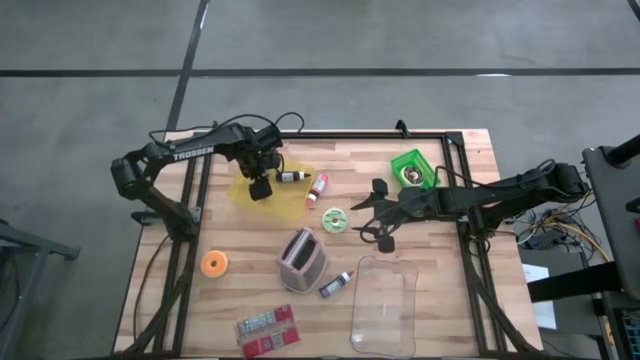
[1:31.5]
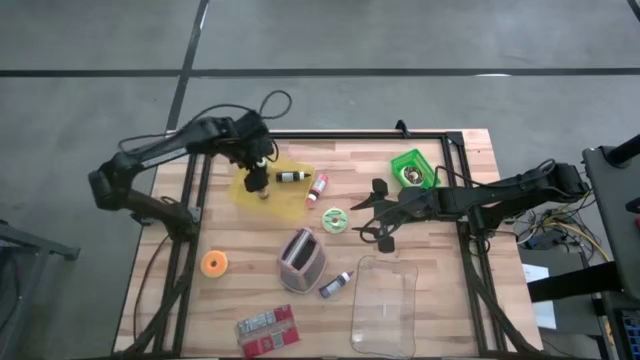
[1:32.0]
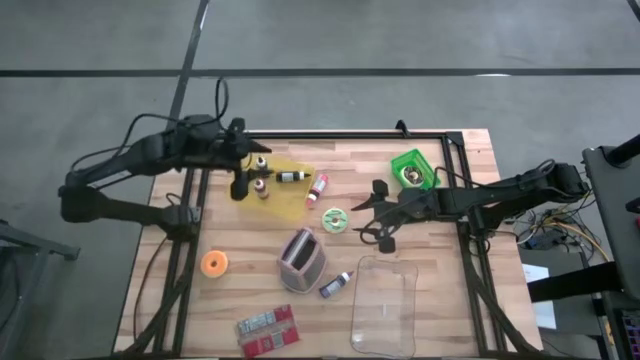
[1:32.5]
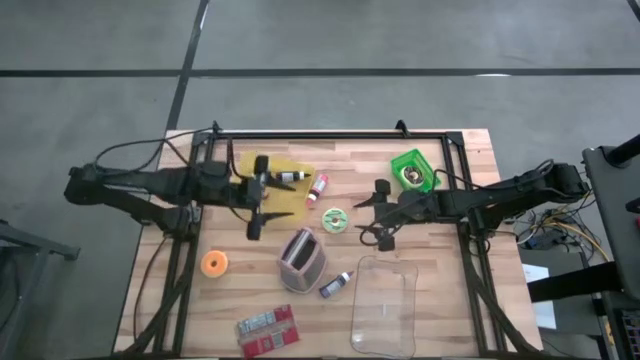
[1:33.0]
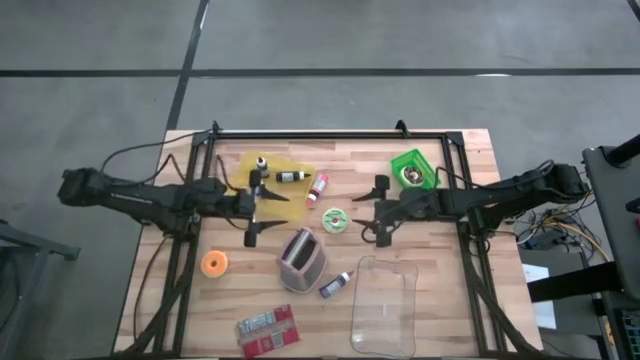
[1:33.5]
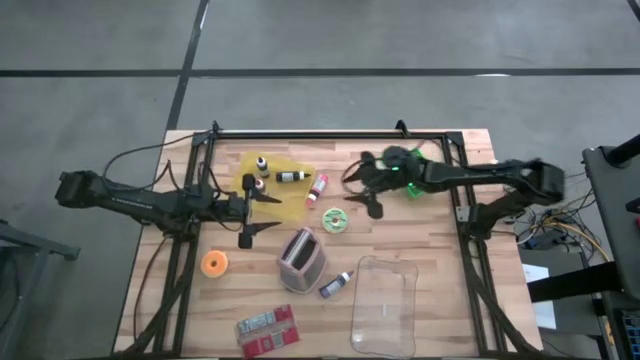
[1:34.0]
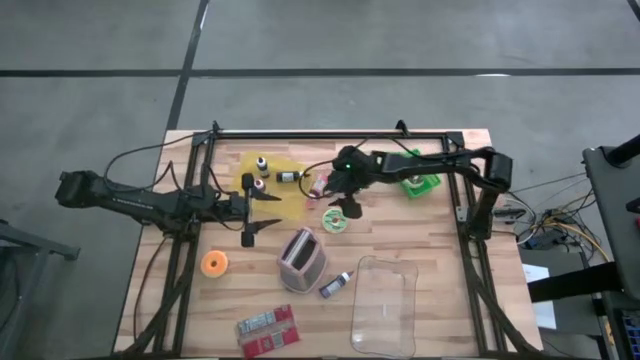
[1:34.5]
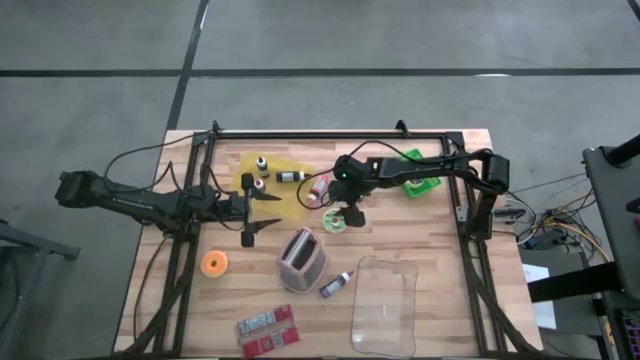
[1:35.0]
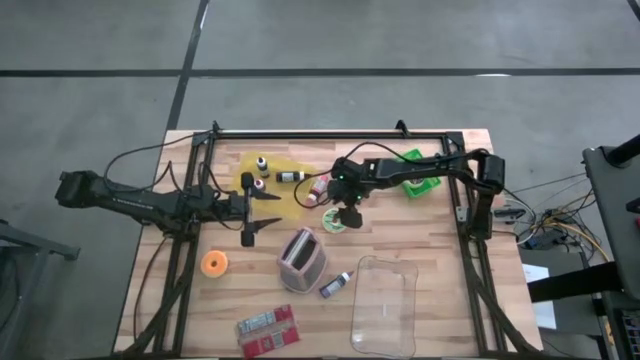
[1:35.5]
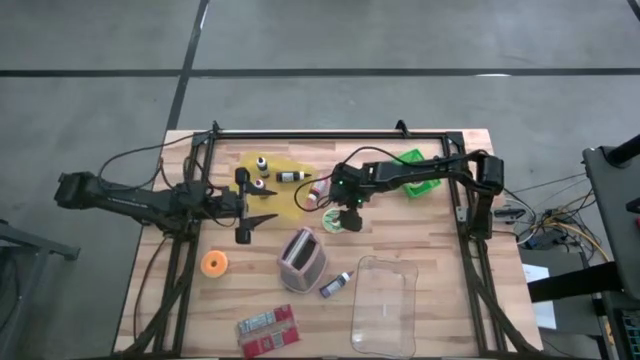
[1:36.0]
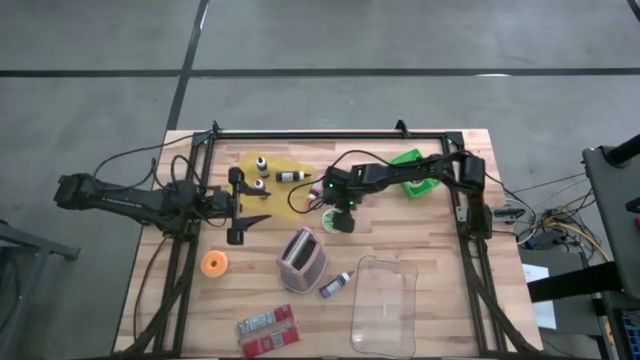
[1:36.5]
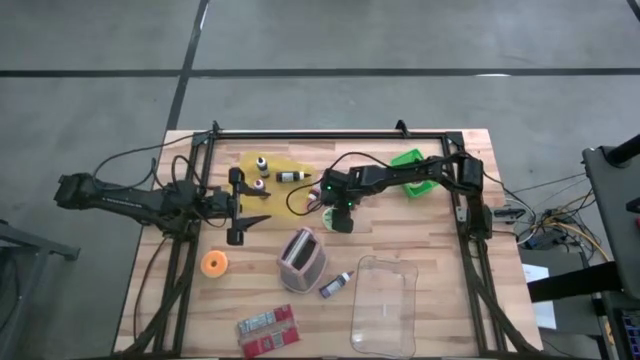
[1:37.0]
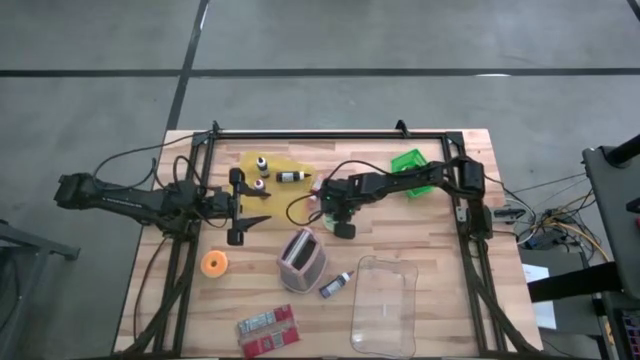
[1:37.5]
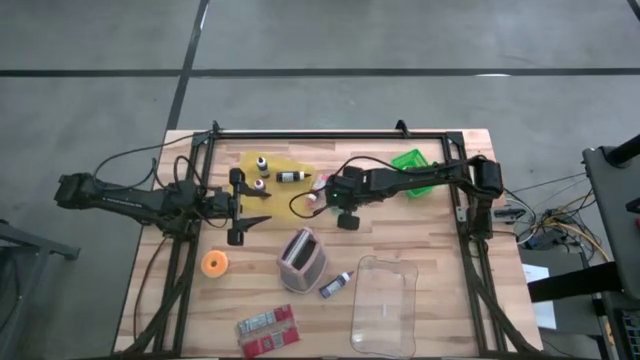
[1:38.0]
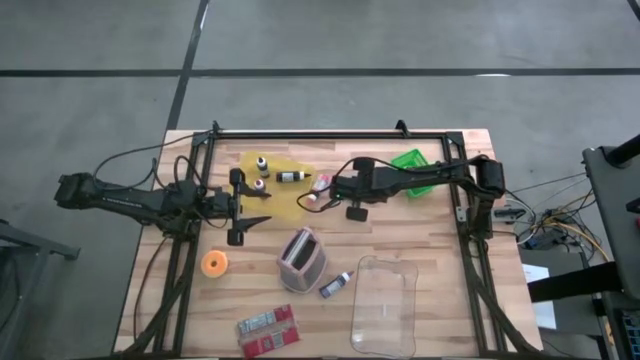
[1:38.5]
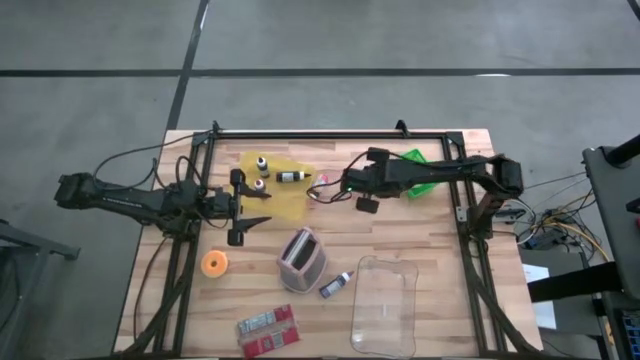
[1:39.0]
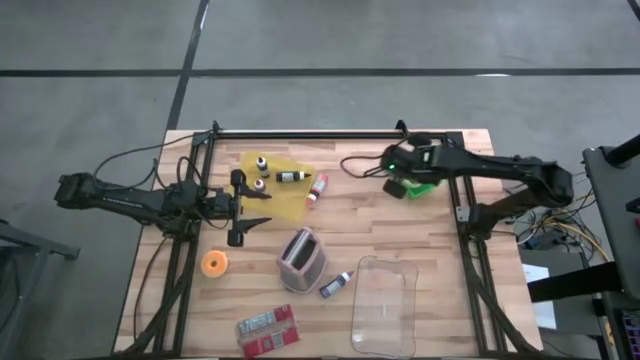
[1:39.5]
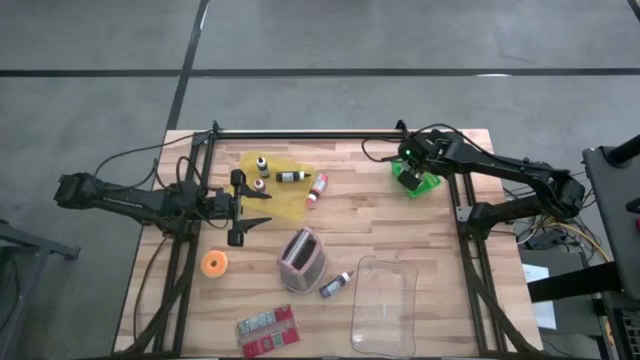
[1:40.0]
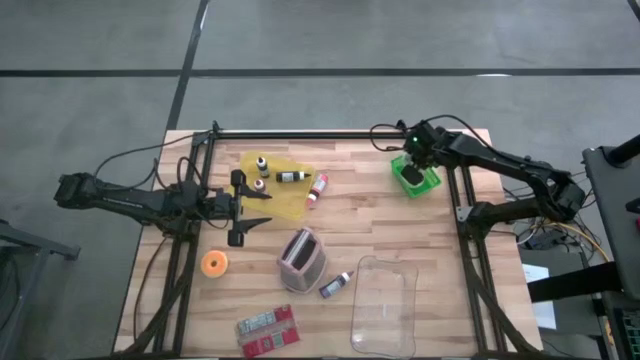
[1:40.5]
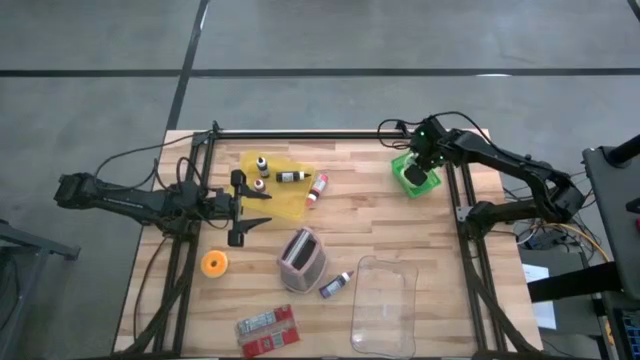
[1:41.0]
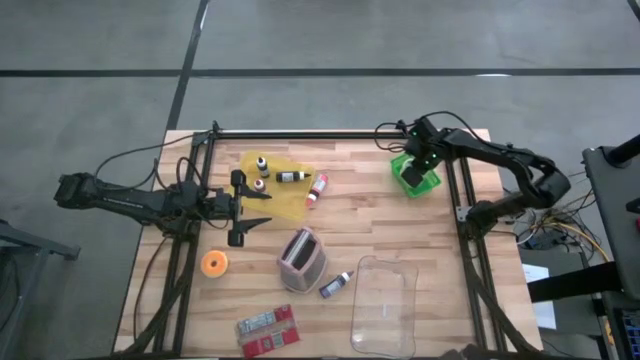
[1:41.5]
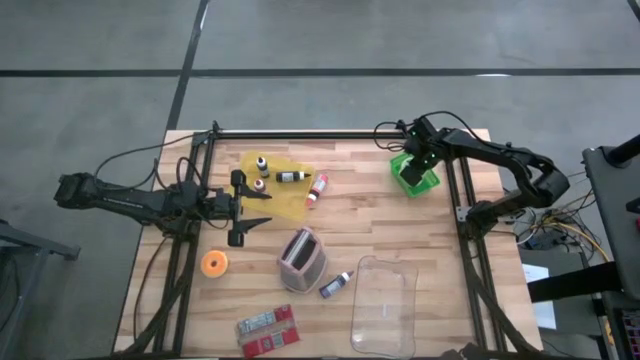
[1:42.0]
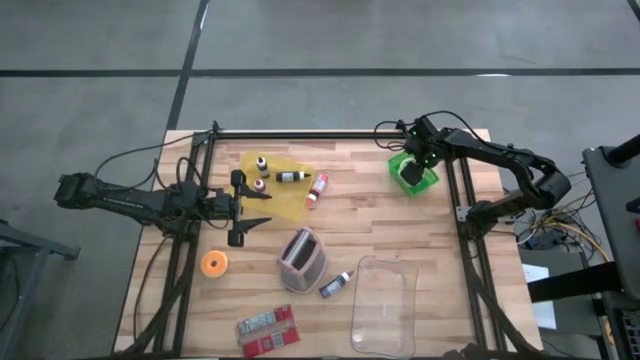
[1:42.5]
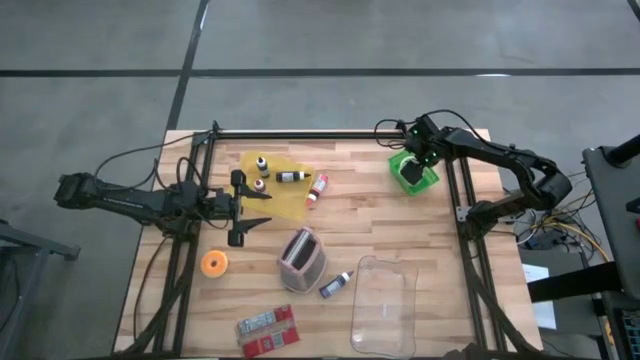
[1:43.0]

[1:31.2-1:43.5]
Task: Pick & Place Food Item
Put the light green donut into the green bin

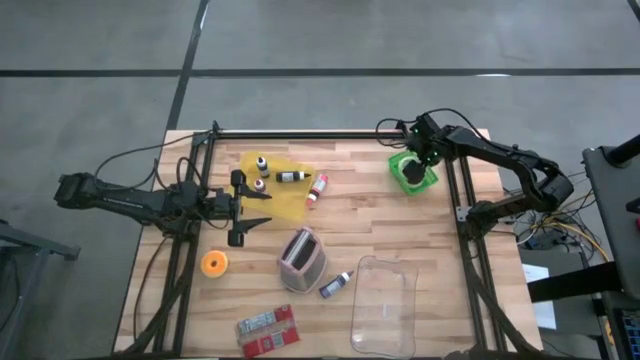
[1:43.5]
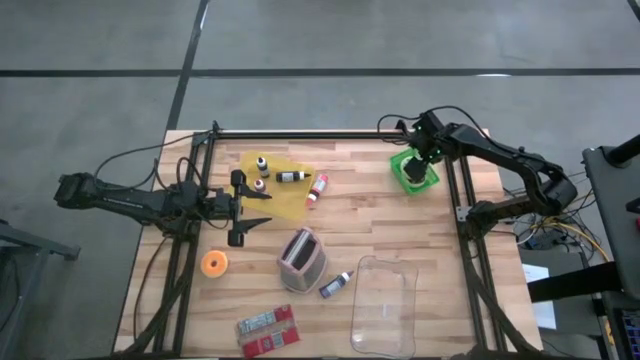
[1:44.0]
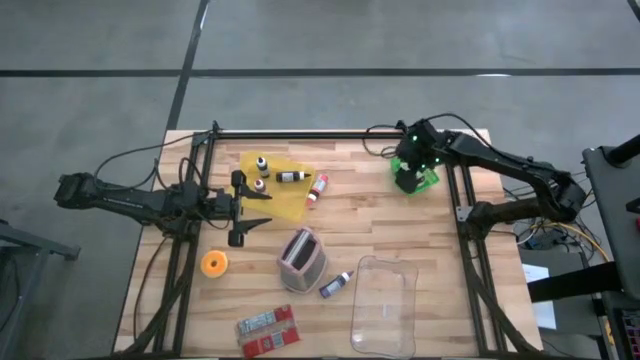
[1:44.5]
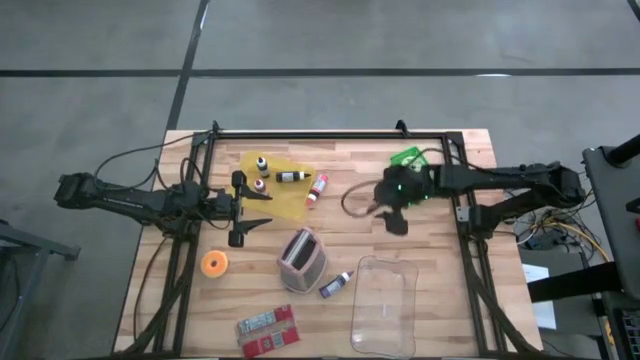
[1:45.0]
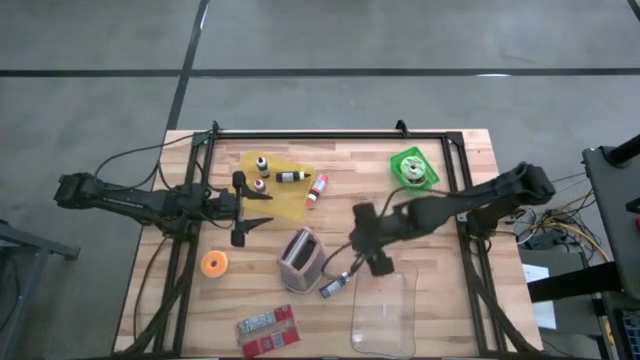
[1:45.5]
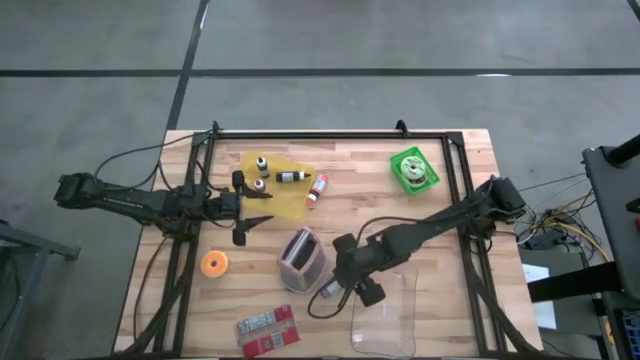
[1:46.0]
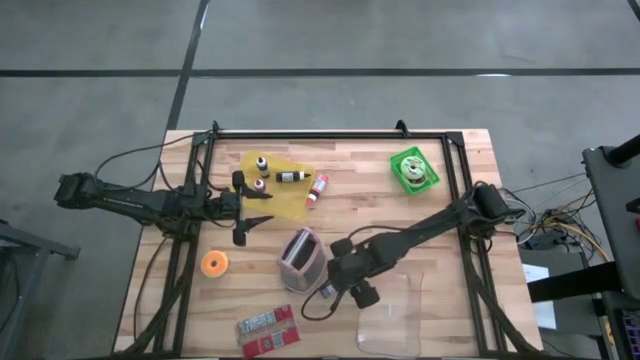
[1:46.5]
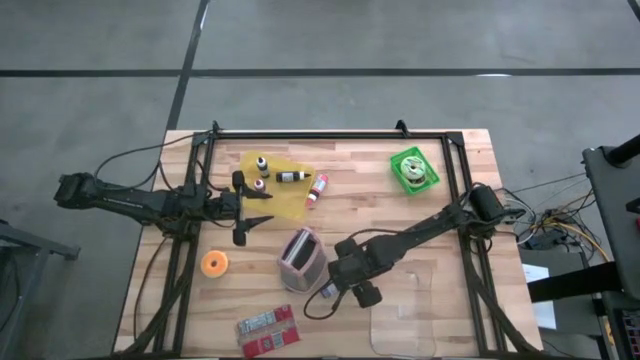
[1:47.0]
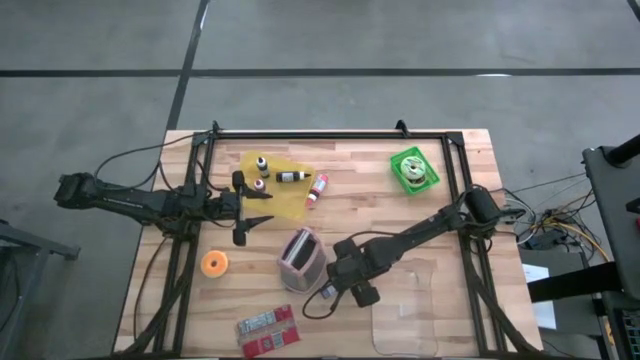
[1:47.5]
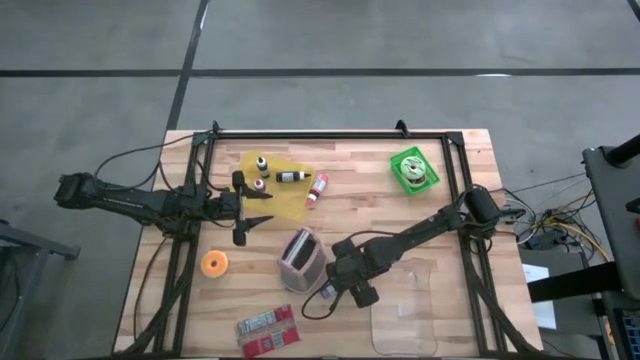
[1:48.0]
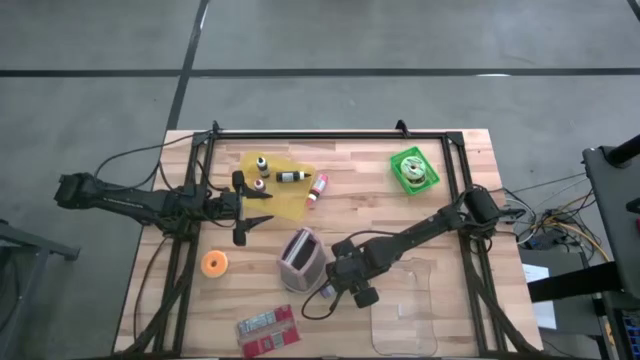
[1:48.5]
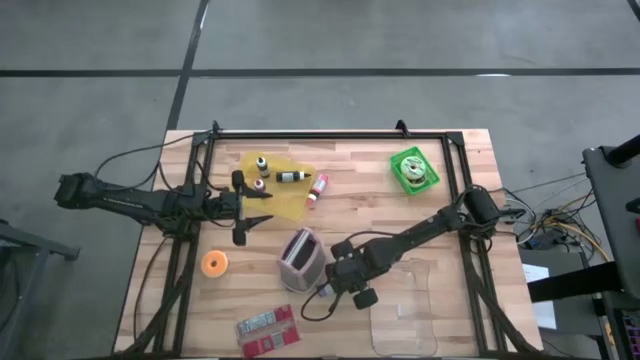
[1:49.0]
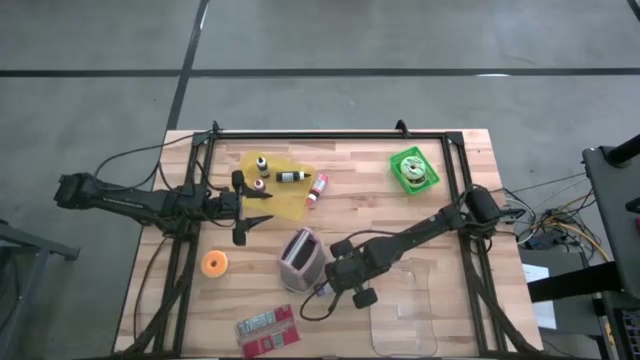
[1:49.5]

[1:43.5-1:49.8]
Put the violet food coloring into the yellow bin

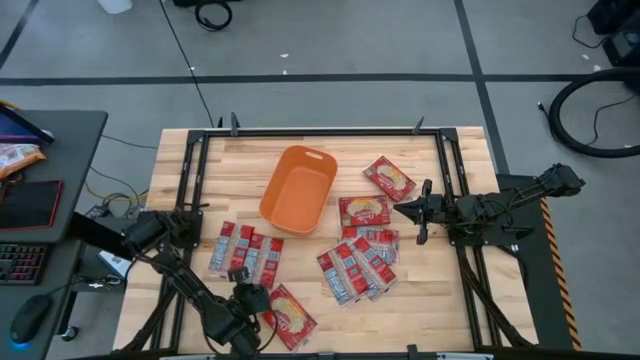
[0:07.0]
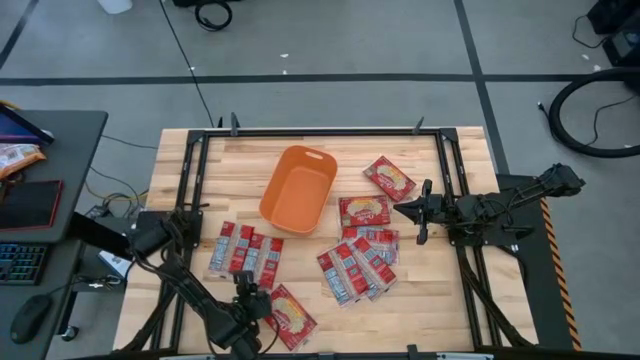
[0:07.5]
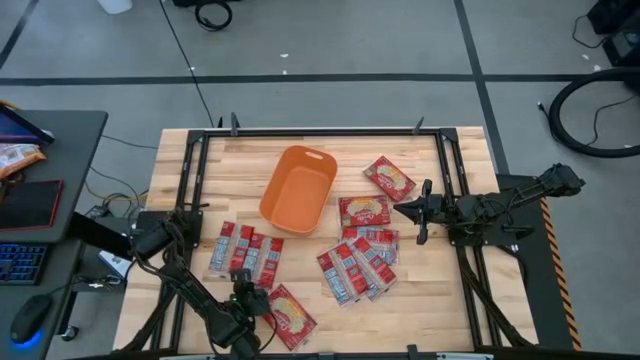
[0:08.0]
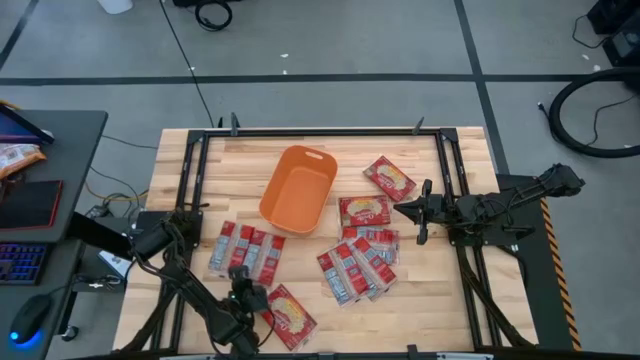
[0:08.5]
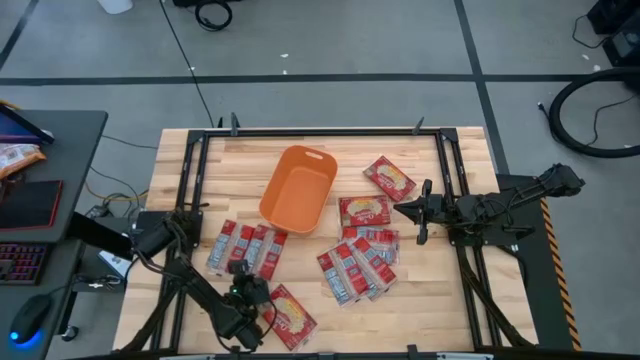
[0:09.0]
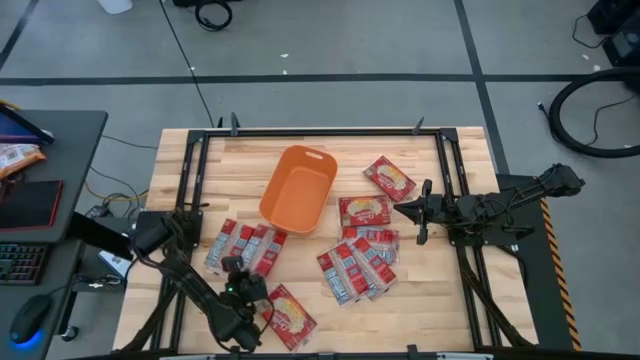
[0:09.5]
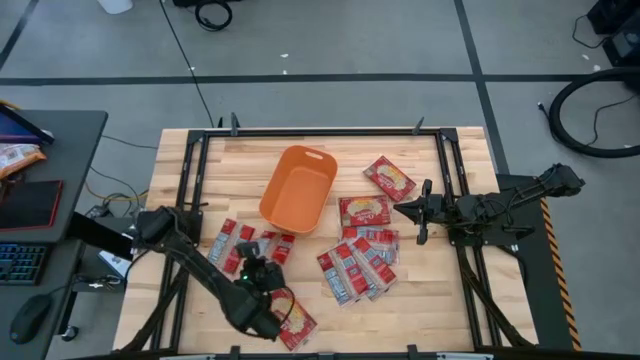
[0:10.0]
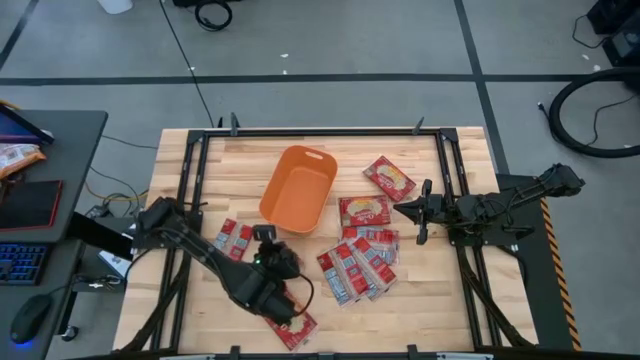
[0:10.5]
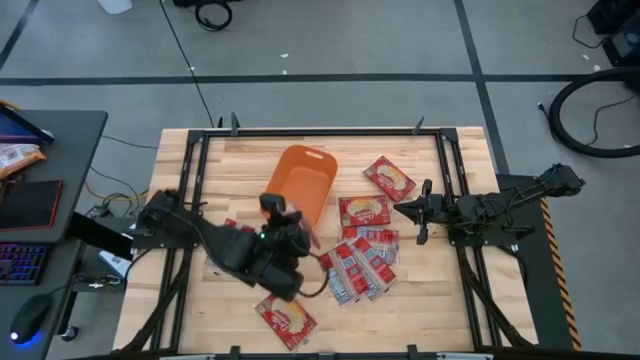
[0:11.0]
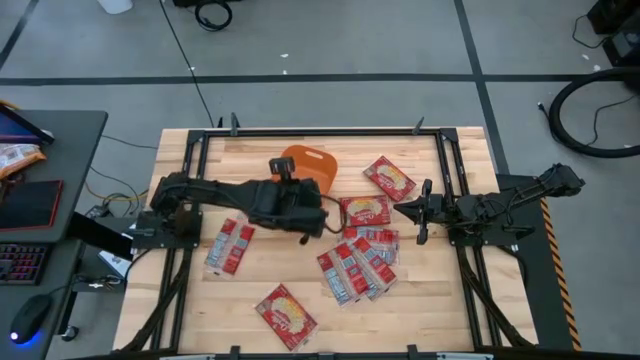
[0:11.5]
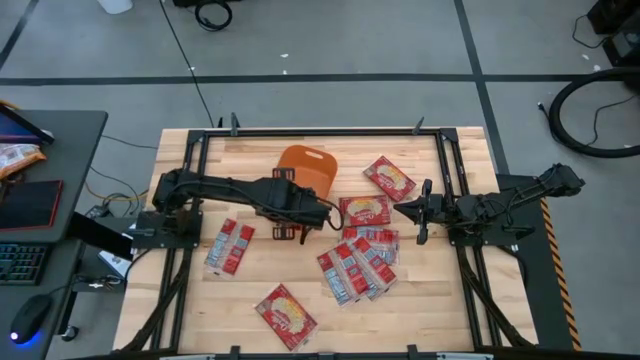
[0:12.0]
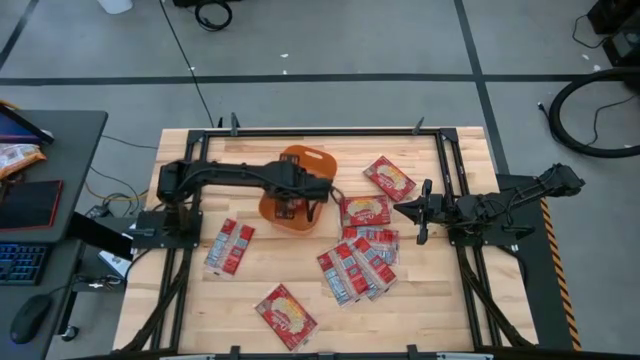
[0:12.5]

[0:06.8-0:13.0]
Task: Sort popcorn bags into baskets
Put the red popcorn pack into the orange bin
